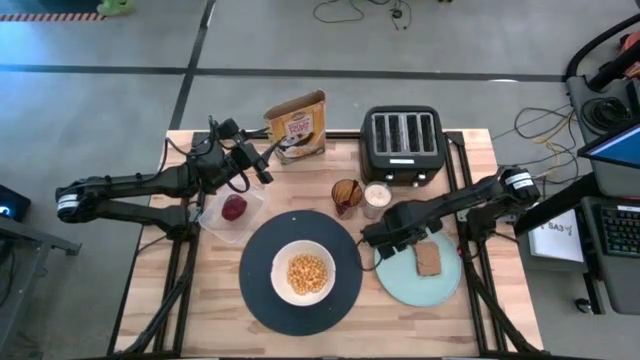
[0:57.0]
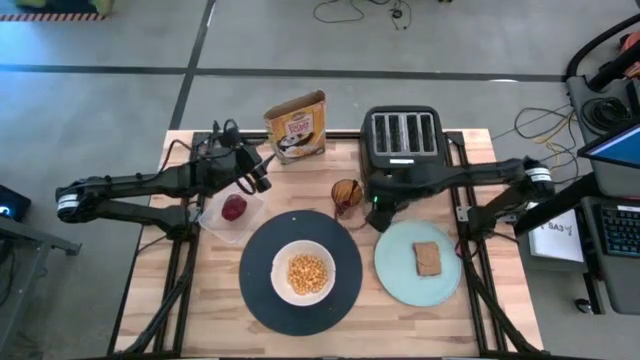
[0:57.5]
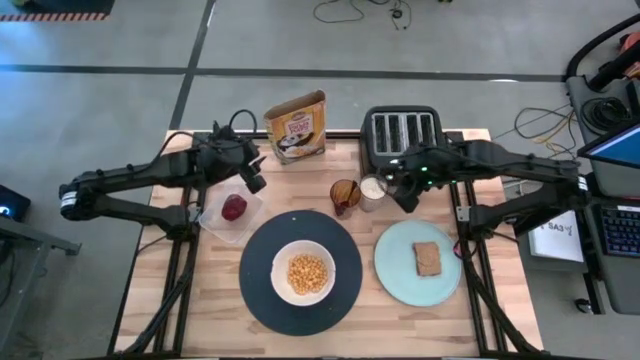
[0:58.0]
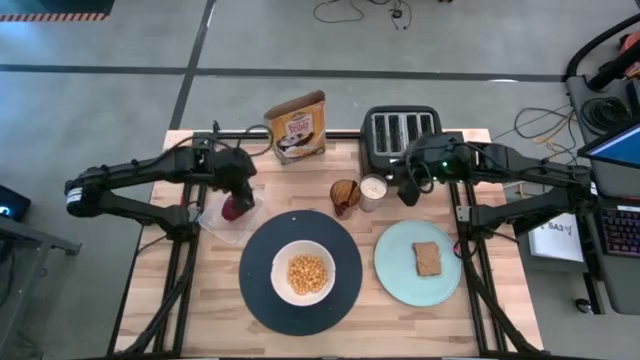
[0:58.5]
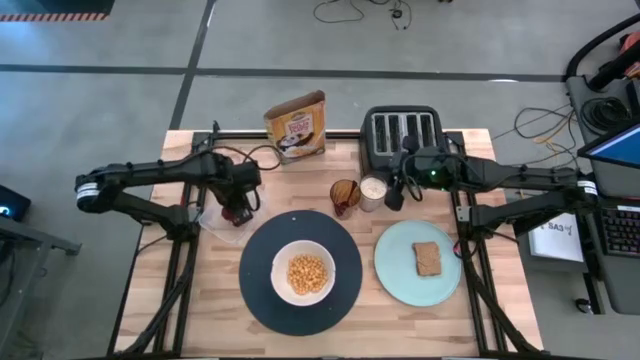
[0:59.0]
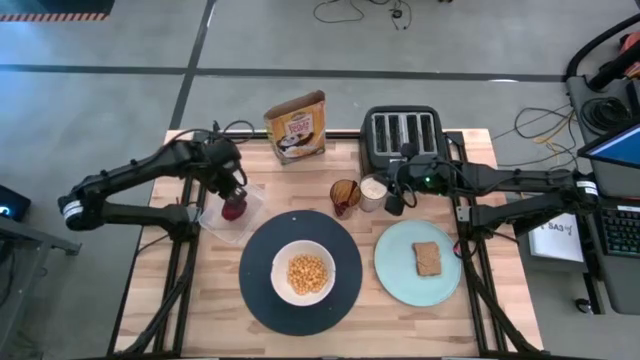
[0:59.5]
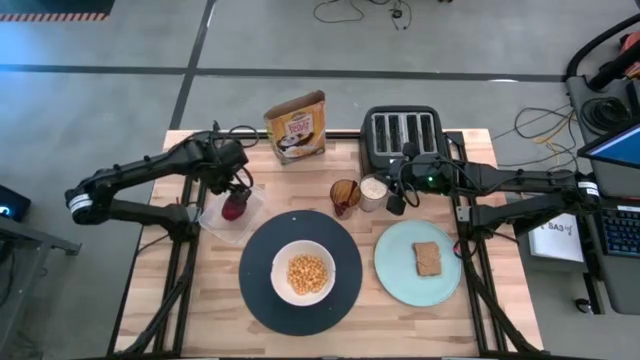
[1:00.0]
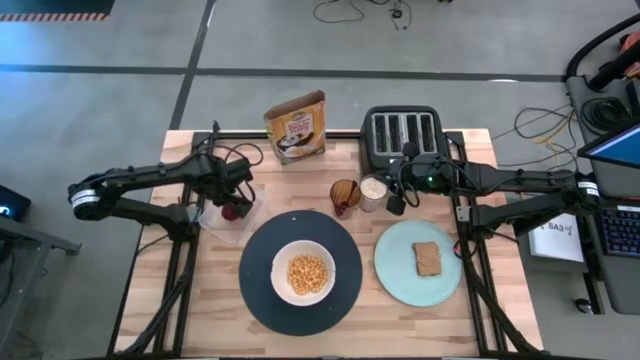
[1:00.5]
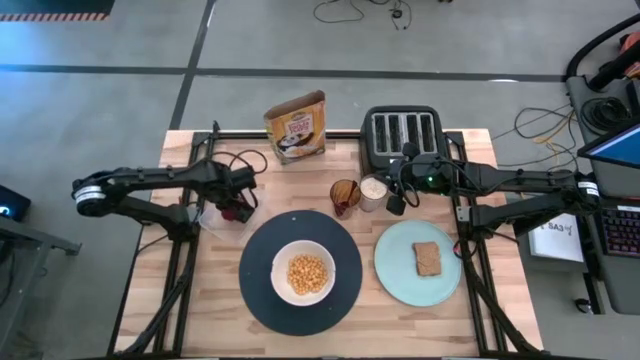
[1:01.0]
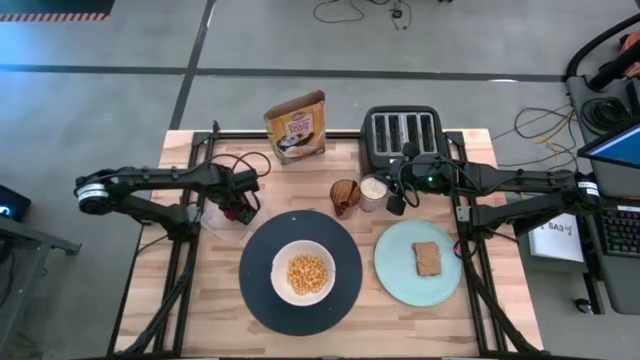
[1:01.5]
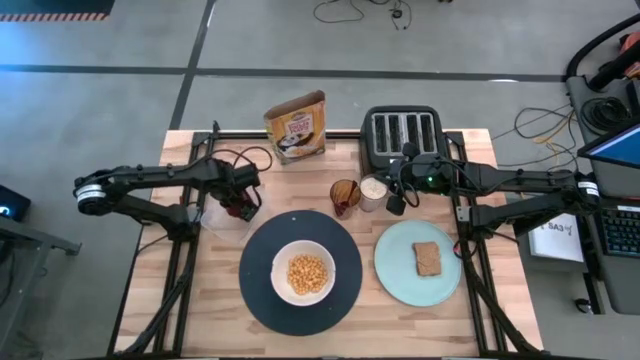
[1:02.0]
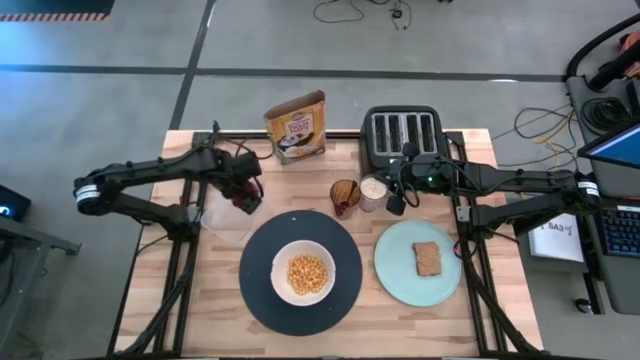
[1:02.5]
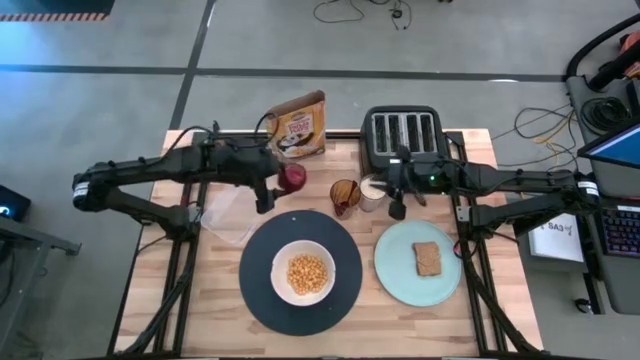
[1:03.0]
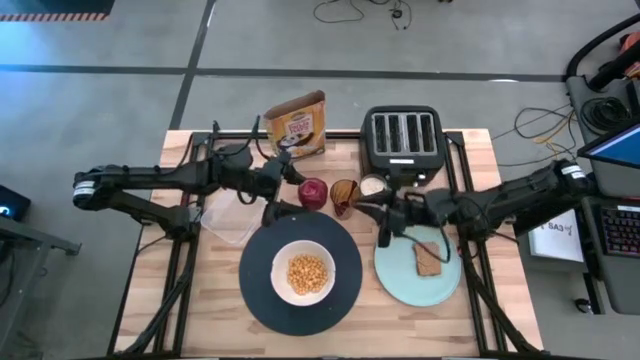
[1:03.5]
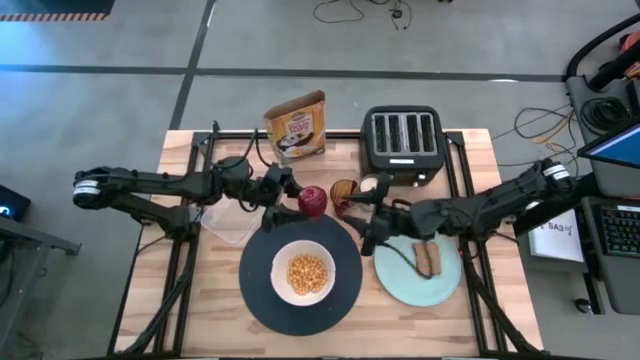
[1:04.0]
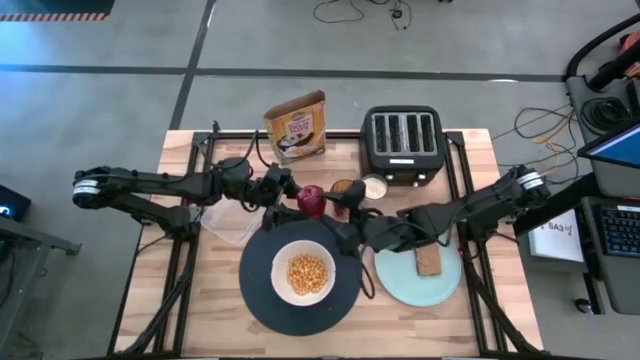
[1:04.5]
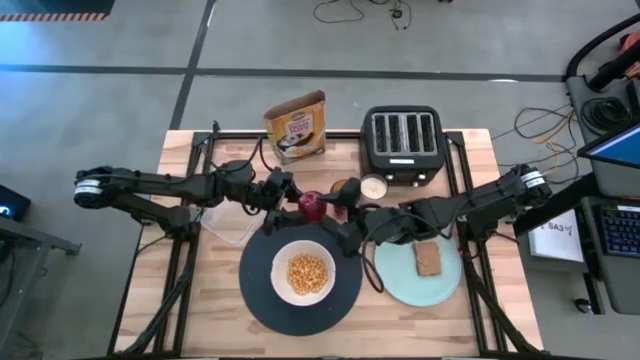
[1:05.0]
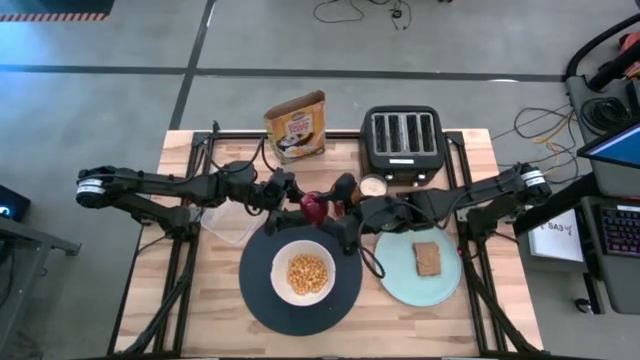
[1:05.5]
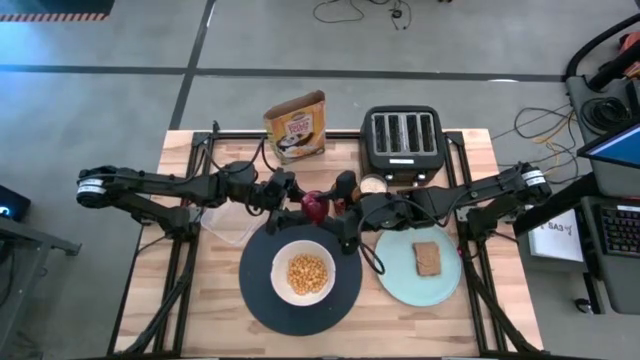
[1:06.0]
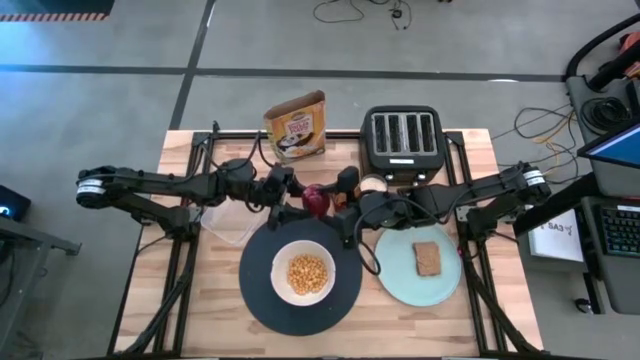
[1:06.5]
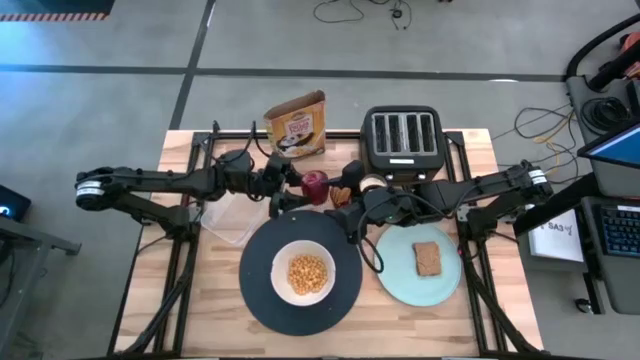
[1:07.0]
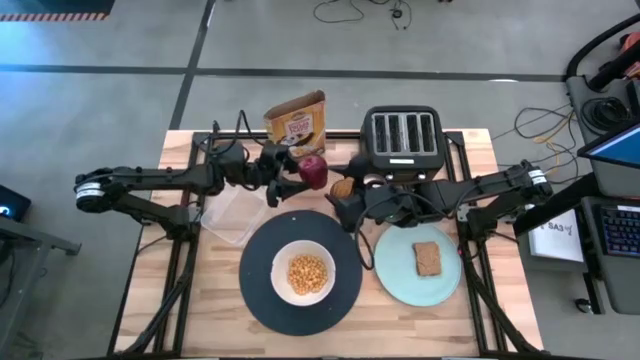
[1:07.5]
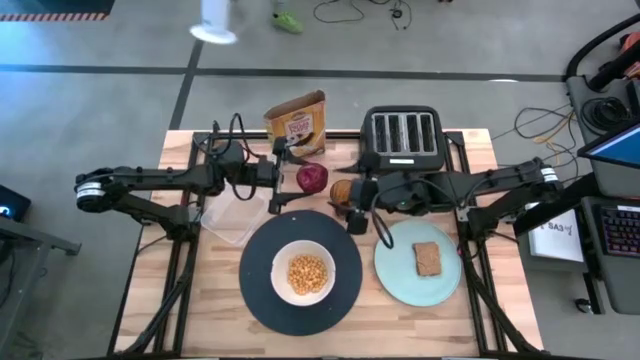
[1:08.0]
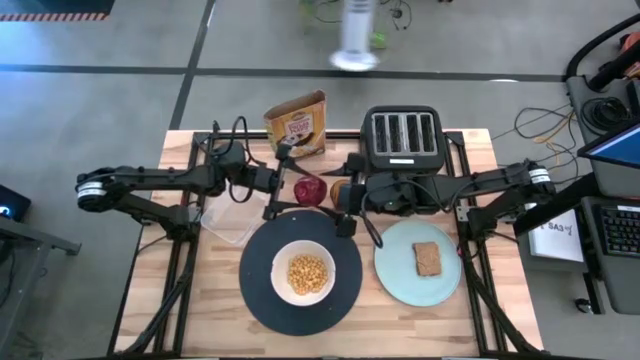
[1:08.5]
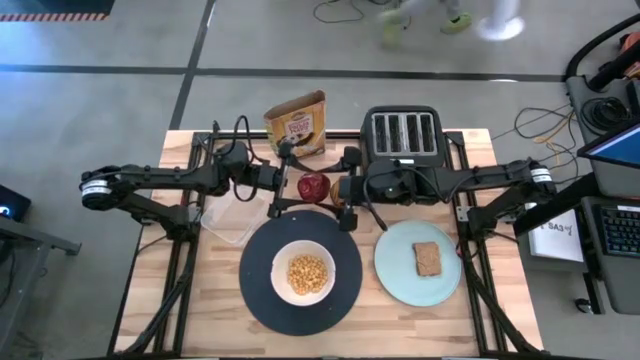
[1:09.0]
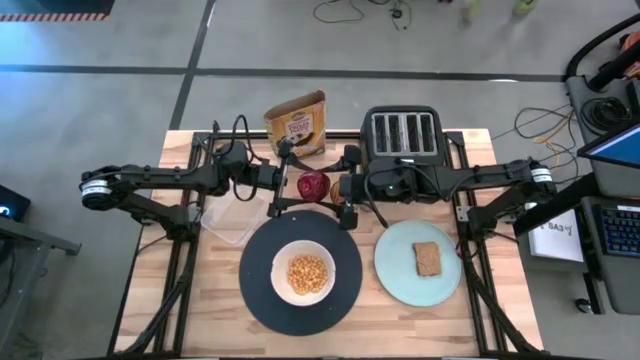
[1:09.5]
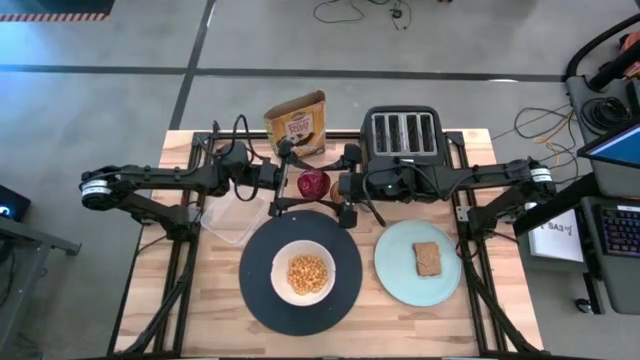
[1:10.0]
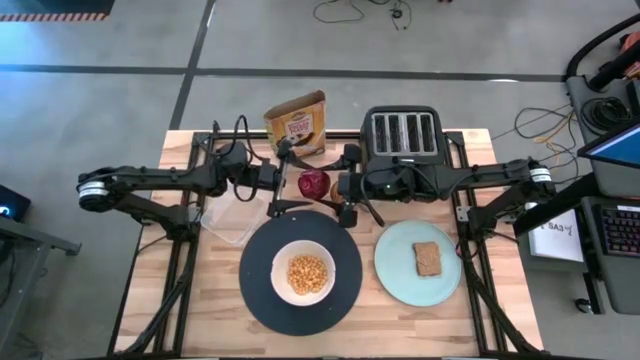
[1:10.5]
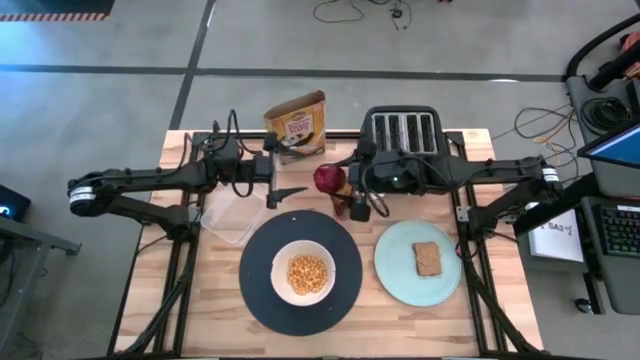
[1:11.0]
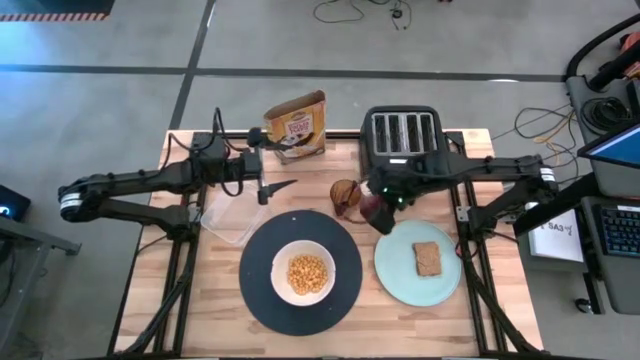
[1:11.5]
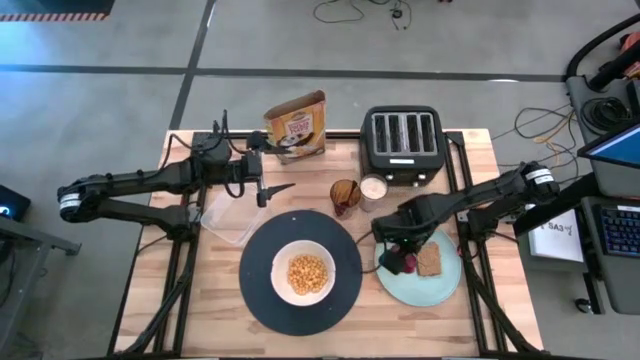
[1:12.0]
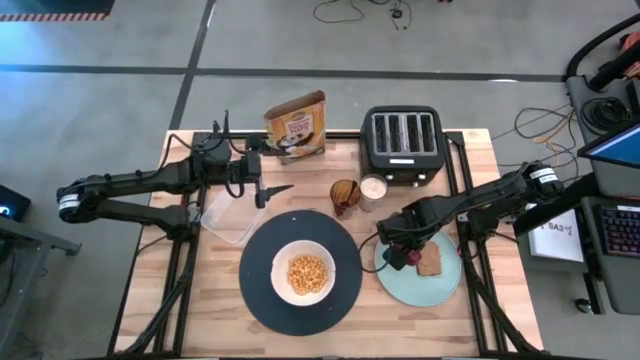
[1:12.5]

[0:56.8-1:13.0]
Task: Arrange a breakfast setting
Put the apple on the blue plate beside the toasted bread

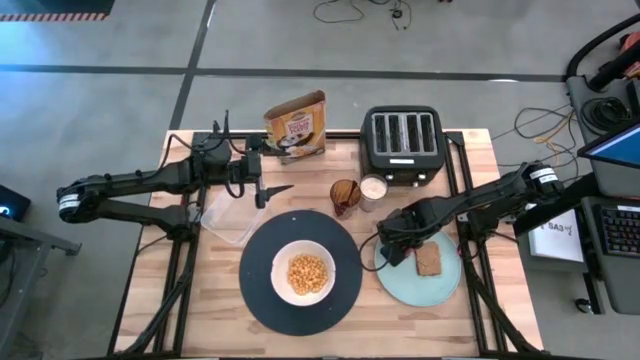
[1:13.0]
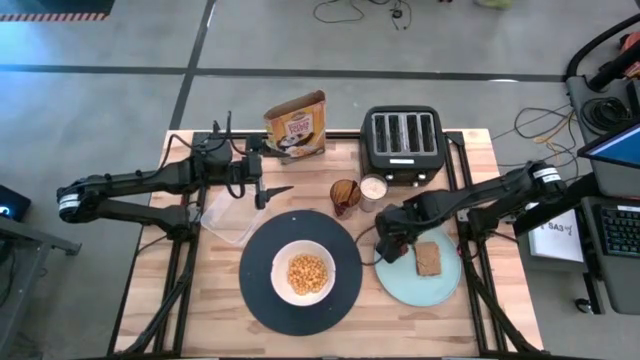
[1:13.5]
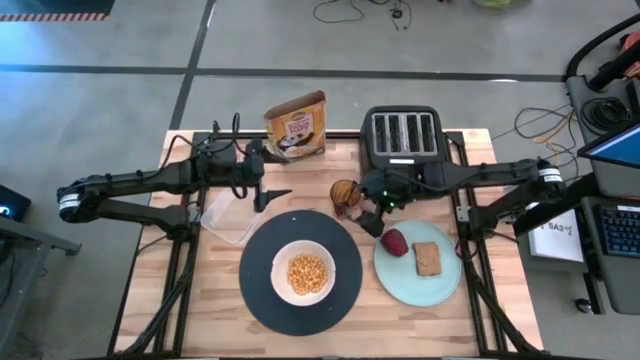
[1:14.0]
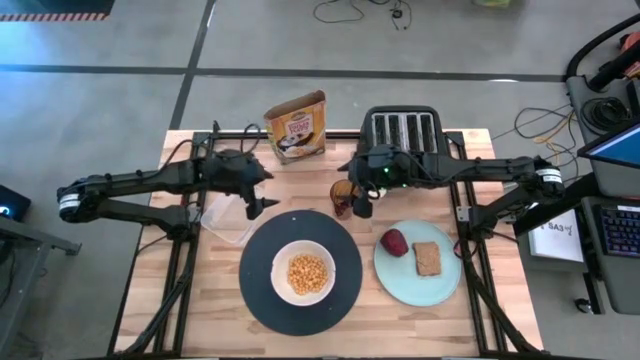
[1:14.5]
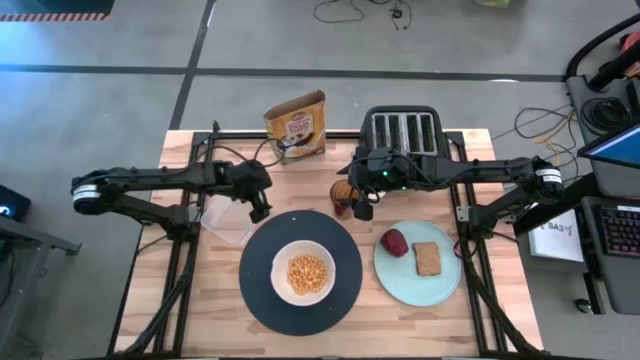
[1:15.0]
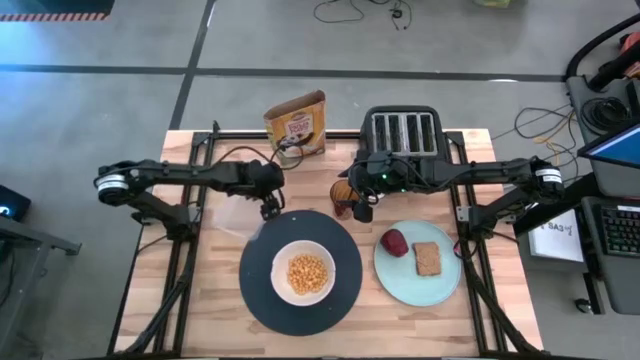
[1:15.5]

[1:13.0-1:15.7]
Adjust the transparent bin

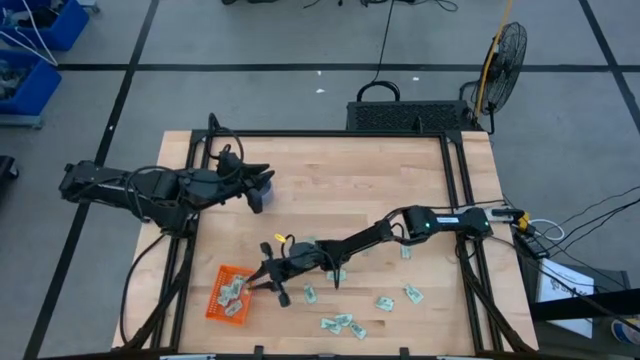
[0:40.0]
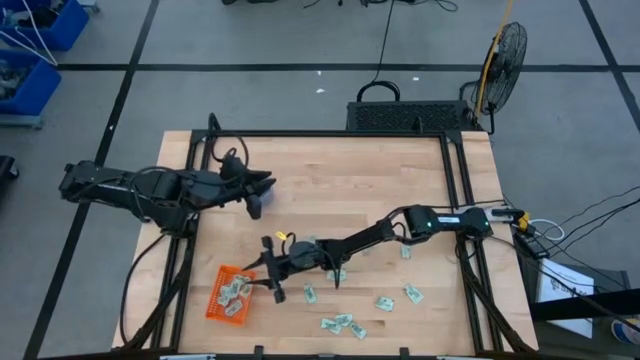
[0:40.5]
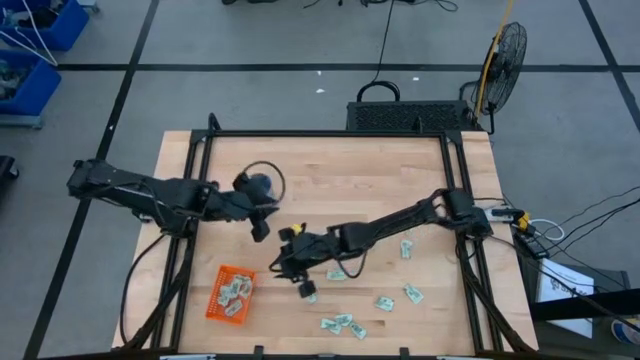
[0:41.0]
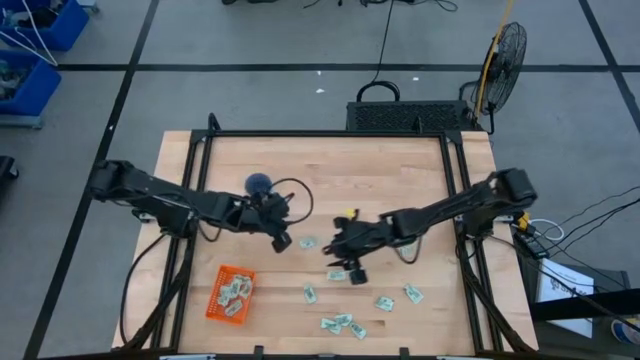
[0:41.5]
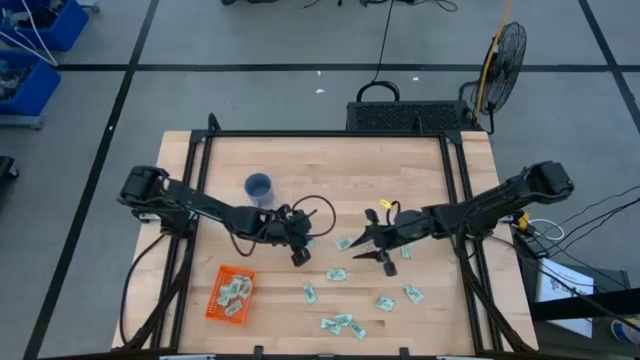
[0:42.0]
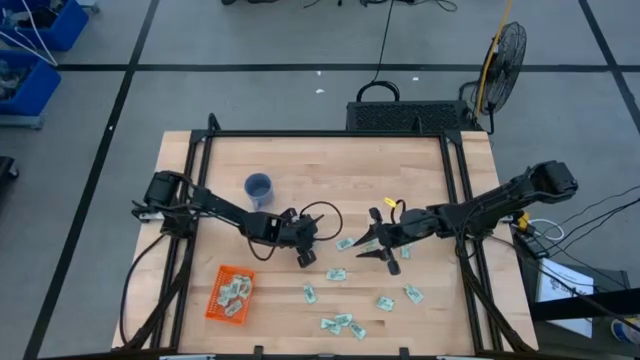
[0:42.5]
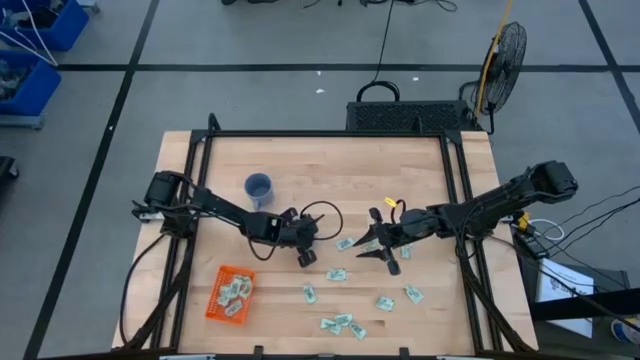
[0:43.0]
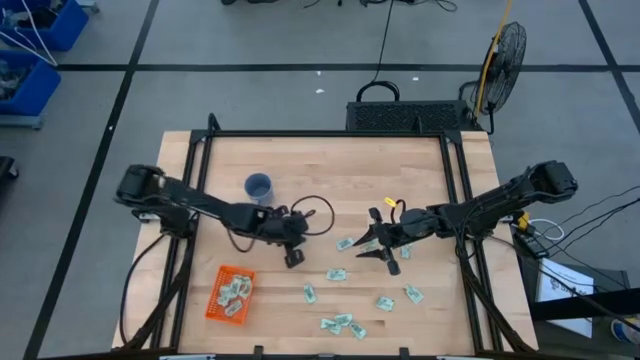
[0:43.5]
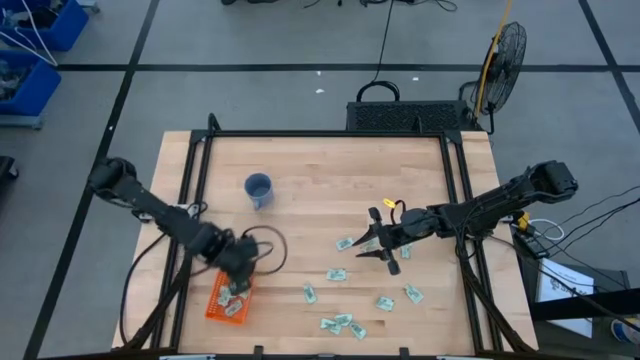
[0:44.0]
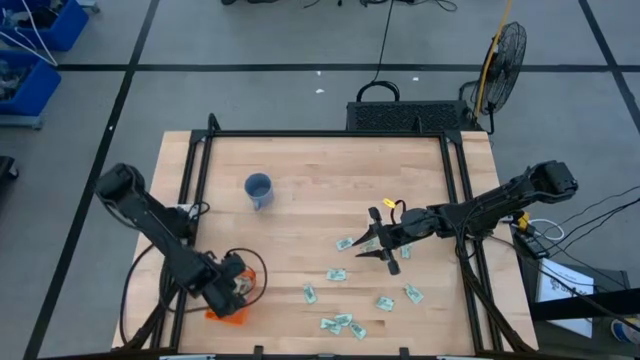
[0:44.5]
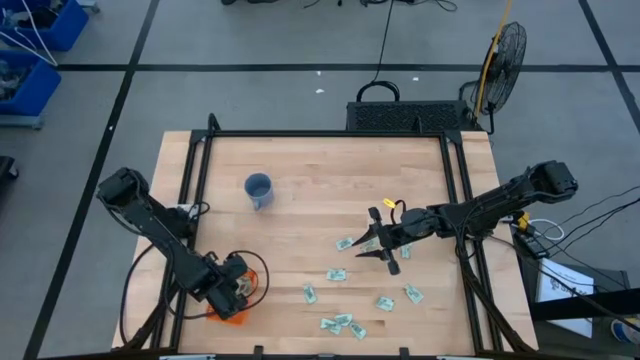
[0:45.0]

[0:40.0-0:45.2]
Task: Pick and place Stevia / Truvia into bins
Put the stevia packet into the orange bin
